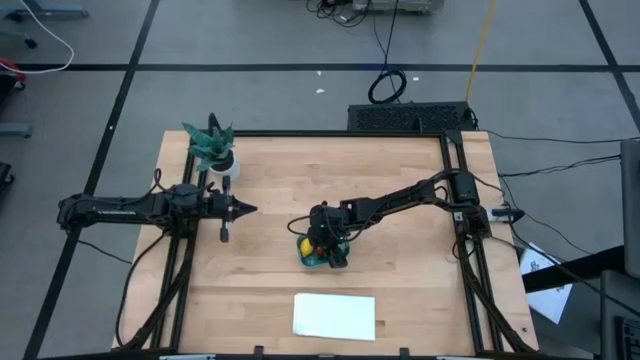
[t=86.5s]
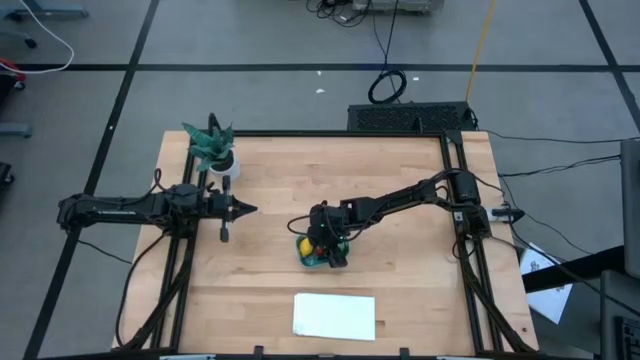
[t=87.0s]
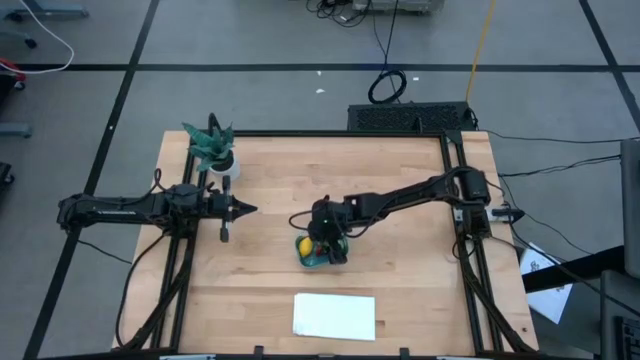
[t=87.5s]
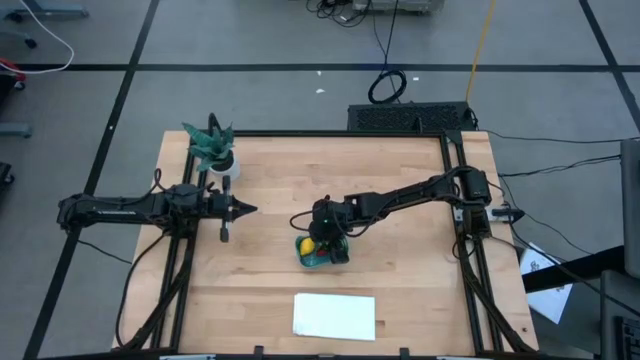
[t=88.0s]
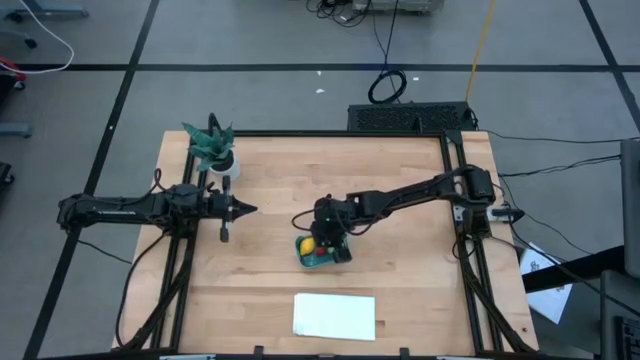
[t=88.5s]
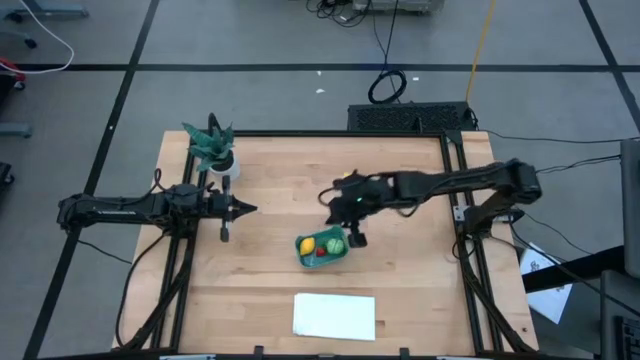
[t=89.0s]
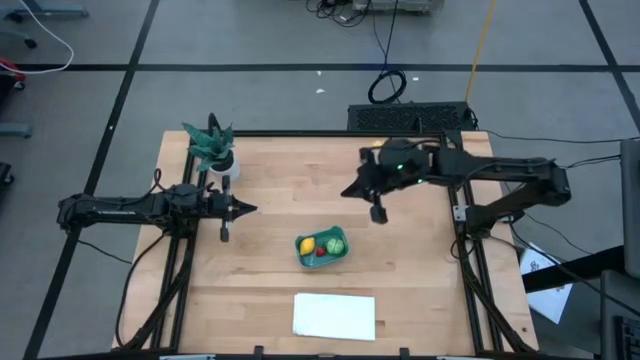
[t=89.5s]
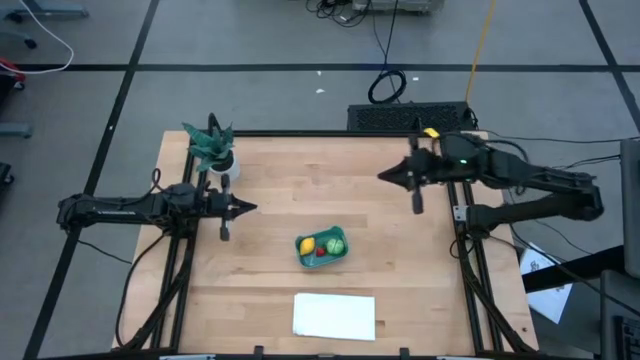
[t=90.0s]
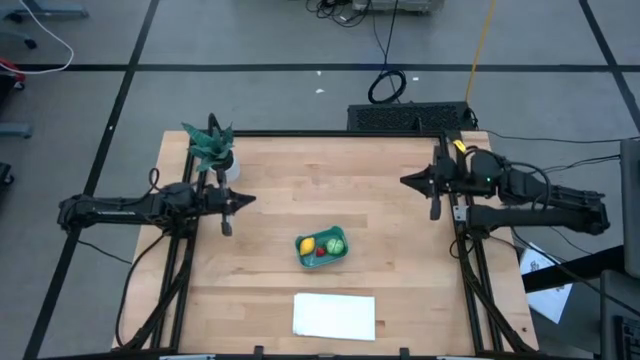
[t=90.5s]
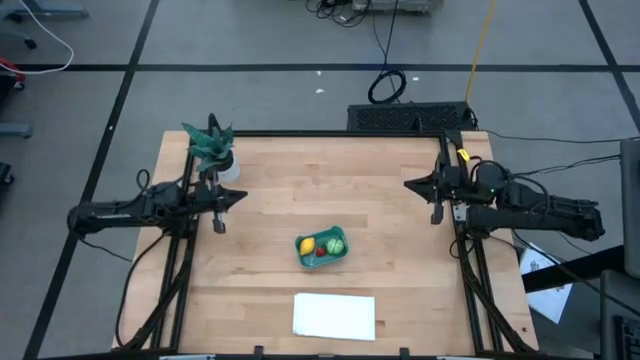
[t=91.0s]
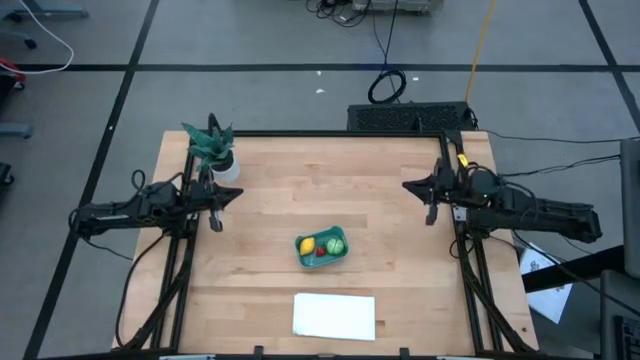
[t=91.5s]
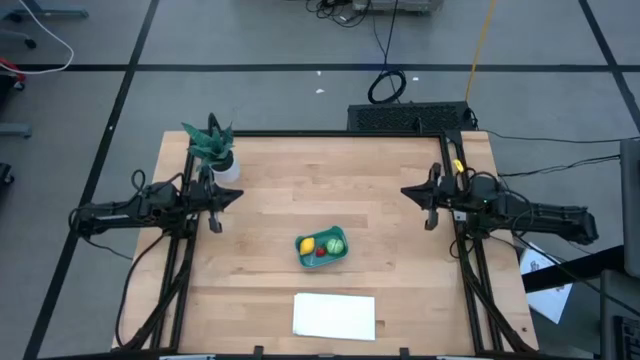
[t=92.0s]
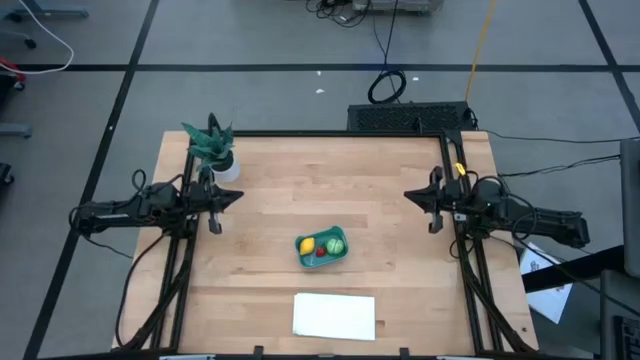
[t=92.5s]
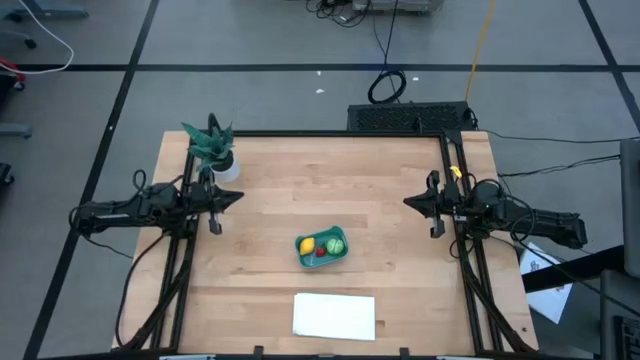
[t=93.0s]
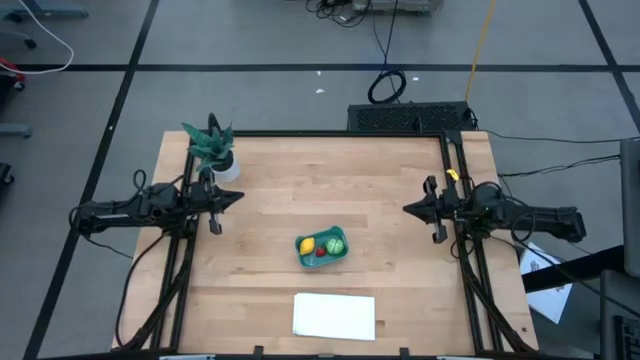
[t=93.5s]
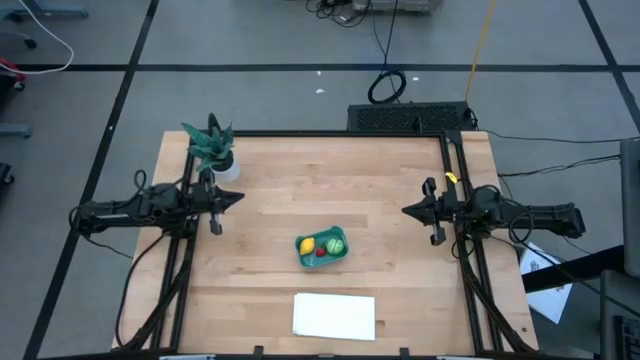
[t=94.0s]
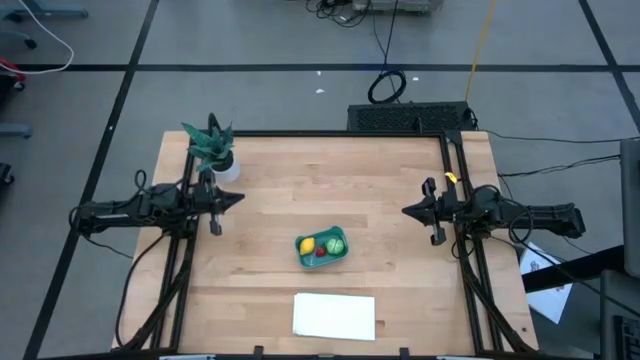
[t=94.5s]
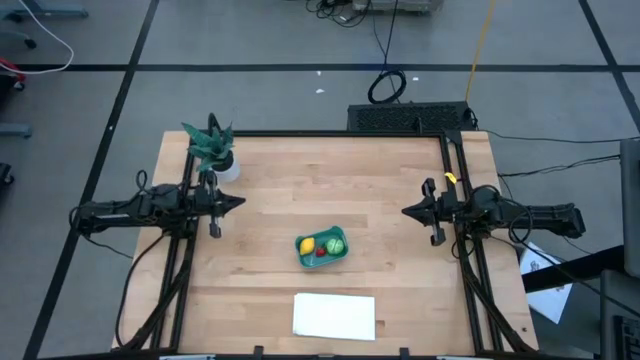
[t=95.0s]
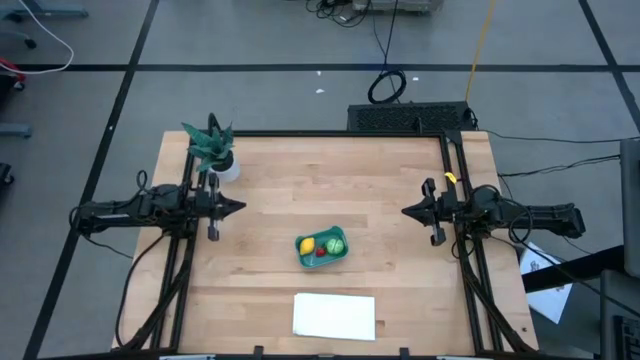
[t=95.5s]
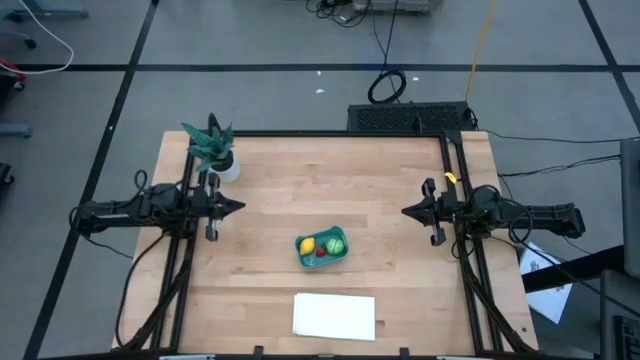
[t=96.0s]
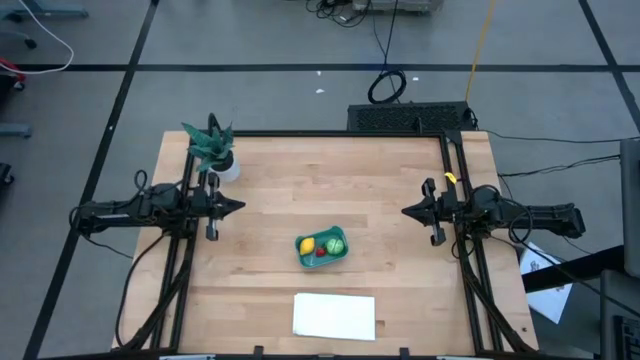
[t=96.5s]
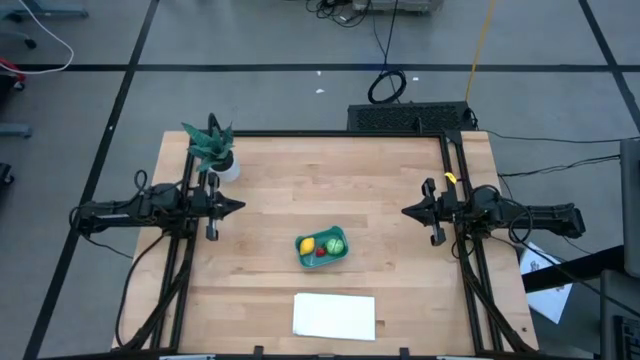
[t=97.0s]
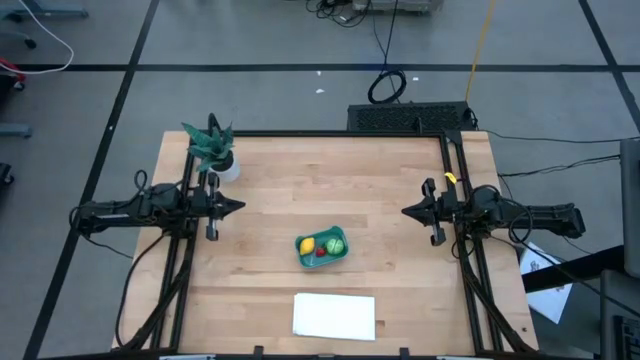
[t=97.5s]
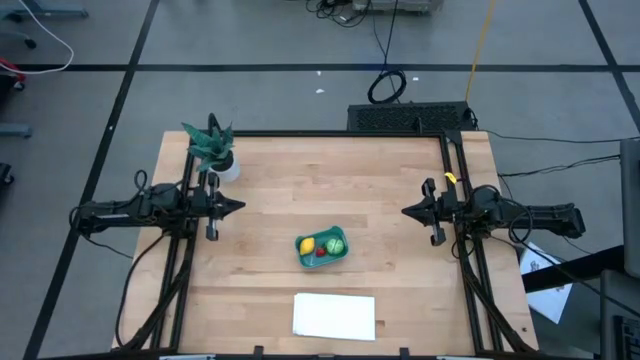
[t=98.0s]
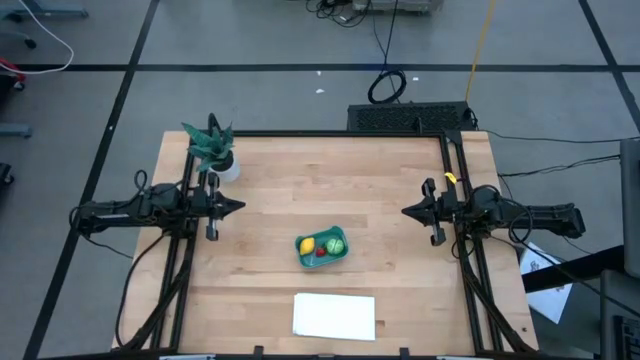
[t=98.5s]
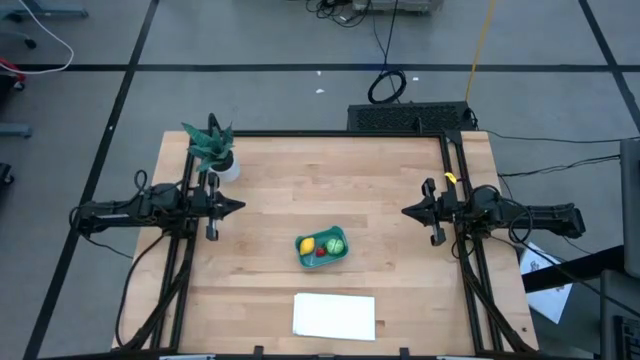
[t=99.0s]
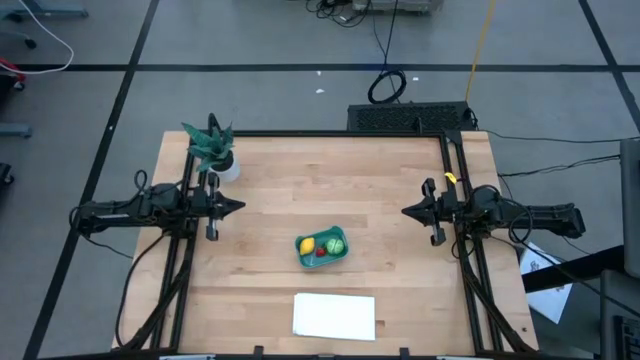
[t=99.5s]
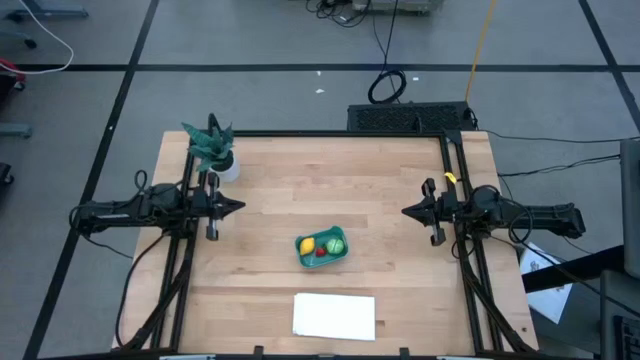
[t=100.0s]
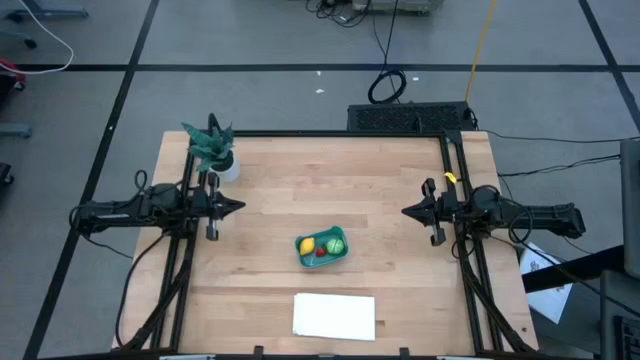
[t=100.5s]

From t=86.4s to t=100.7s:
Task: Pick and placing Produce into tupperware
Return to Home Position

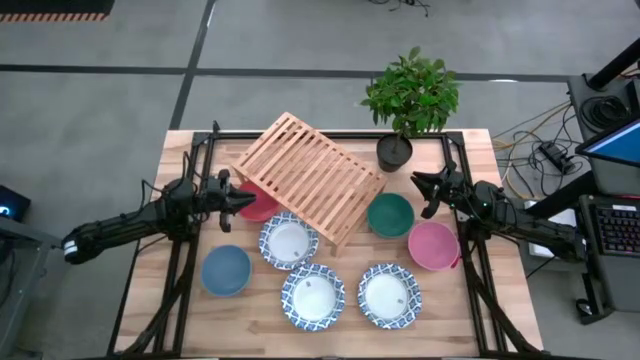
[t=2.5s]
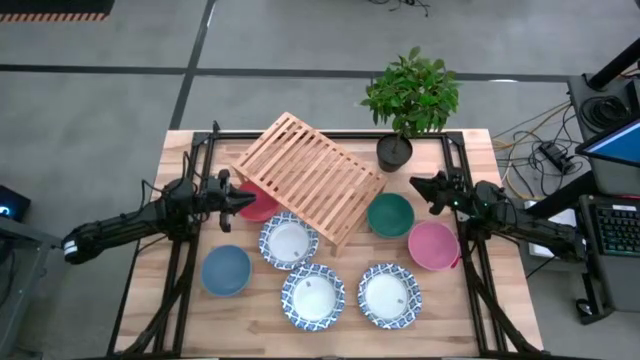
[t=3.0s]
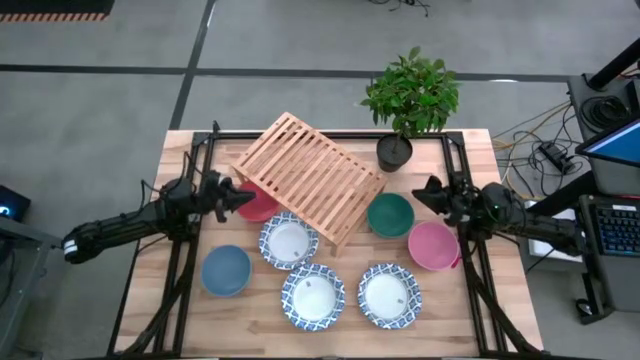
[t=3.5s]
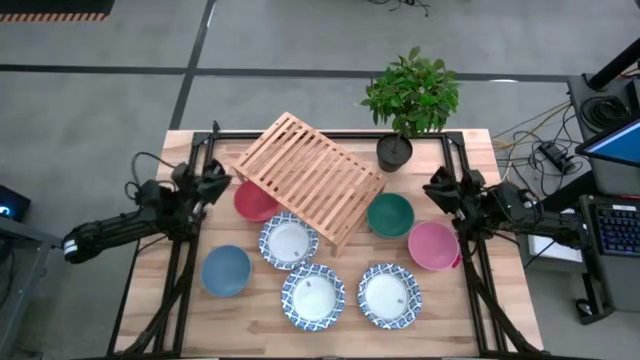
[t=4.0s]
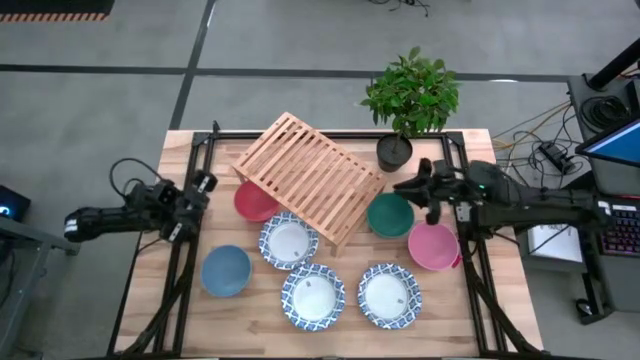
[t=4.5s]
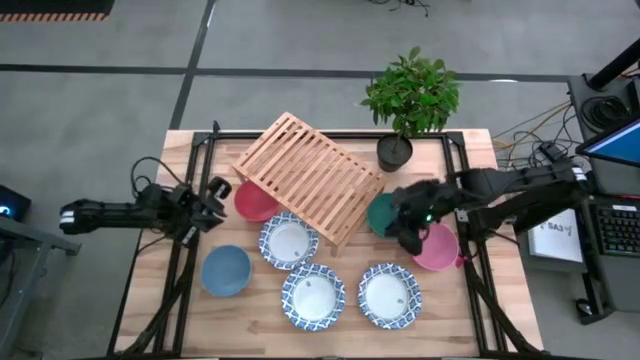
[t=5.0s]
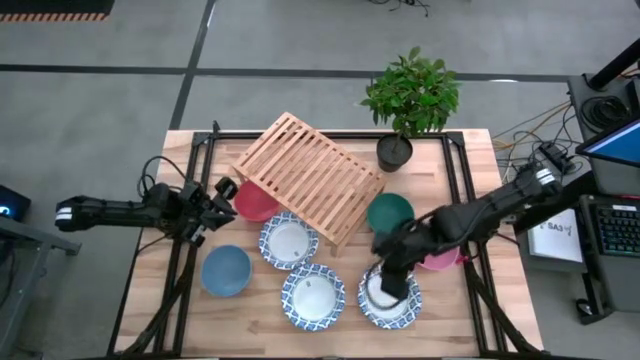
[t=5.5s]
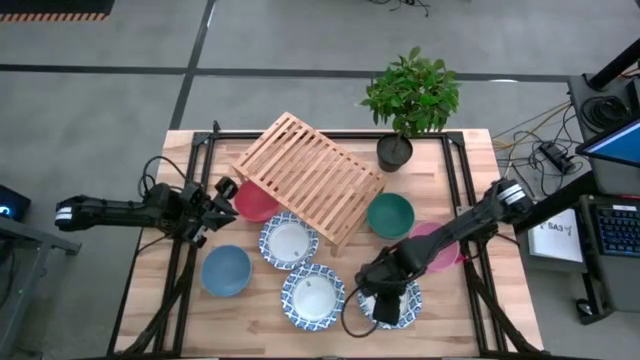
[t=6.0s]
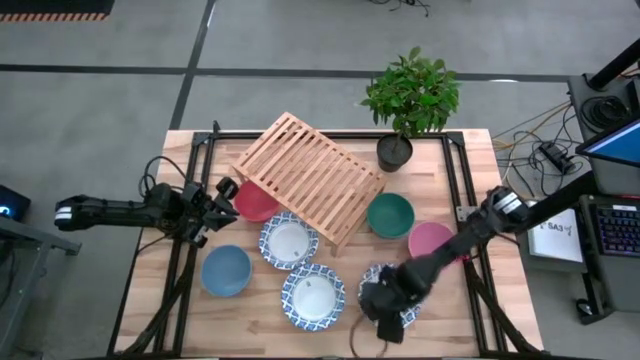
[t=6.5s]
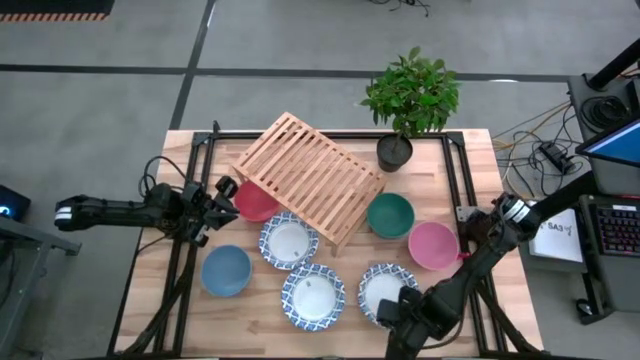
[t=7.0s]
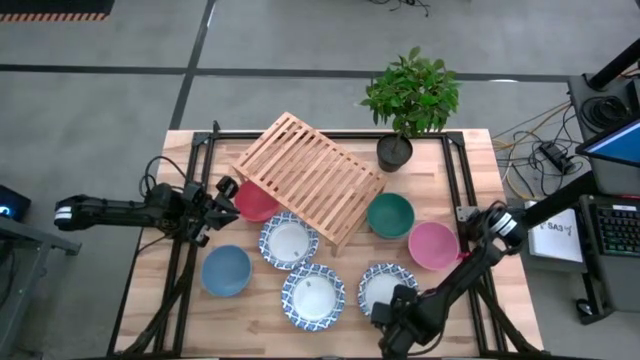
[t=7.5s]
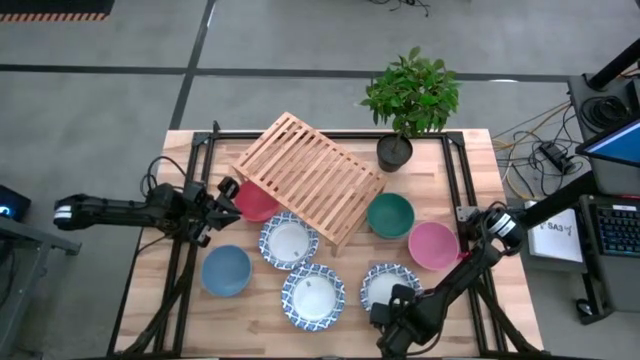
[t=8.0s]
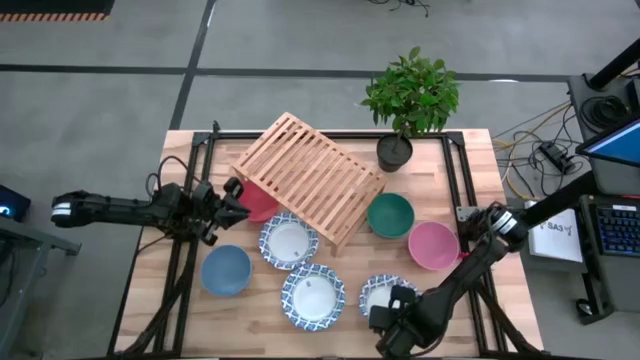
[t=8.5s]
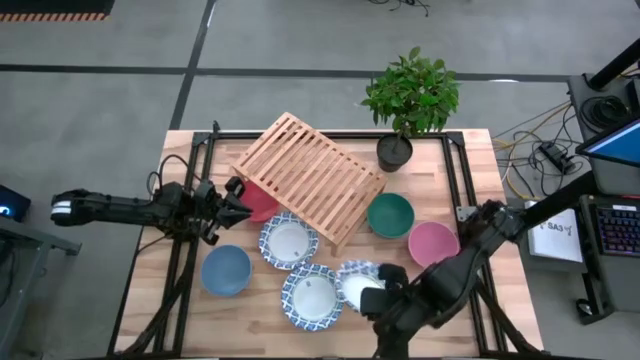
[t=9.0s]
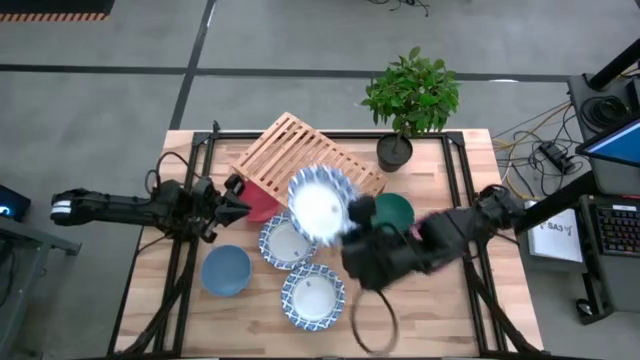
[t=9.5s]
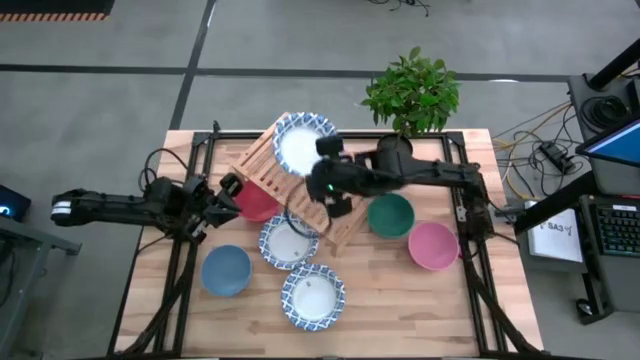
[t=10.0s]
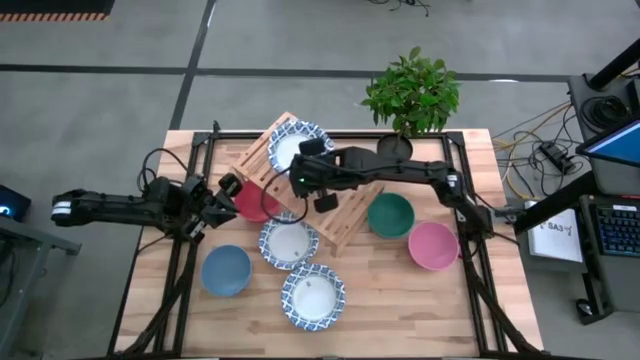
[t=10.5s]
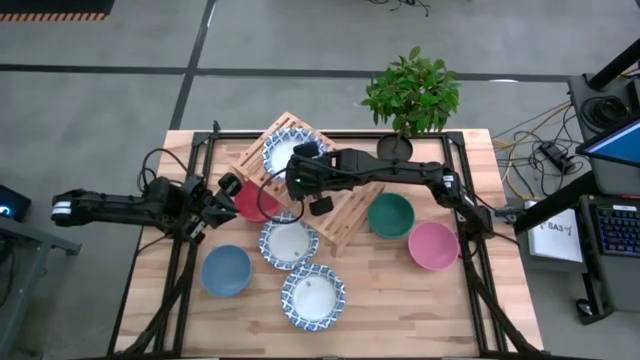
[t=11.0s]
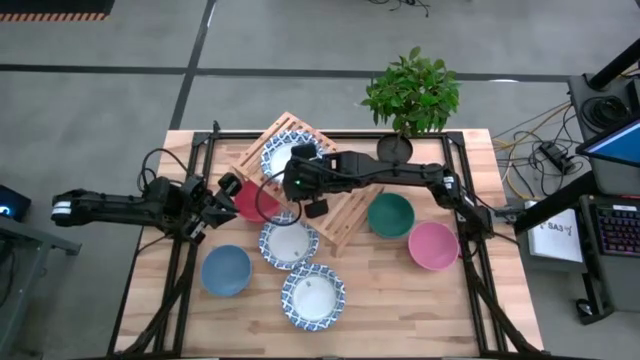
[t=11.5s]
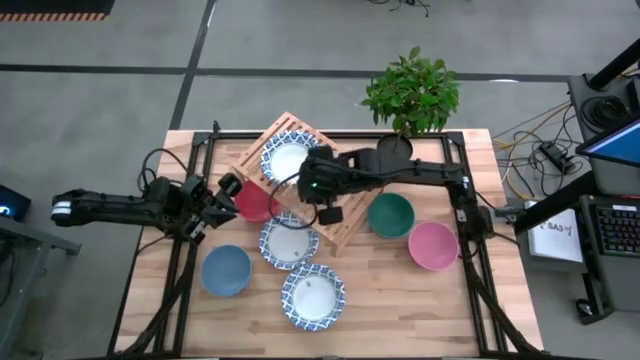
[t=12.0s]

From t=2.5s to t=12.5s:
Task: Place and stack bowls onto a shelf
Put the bottom right white bowl on the shelf
